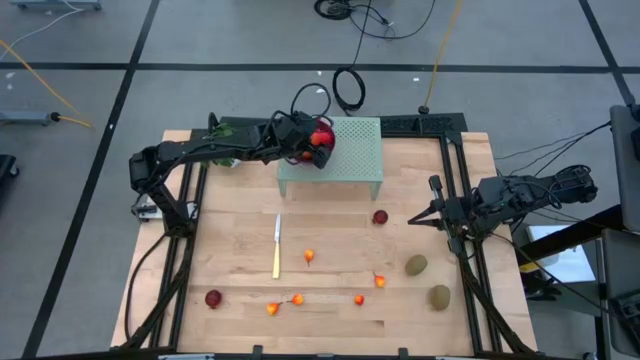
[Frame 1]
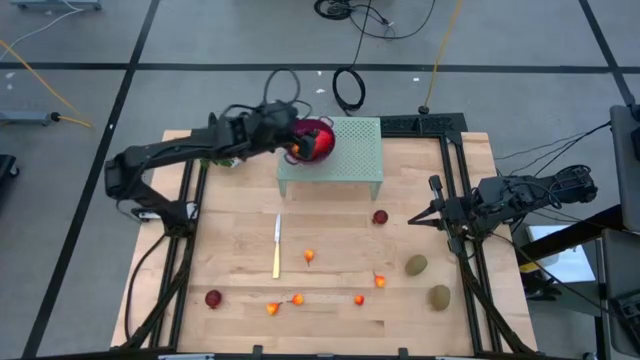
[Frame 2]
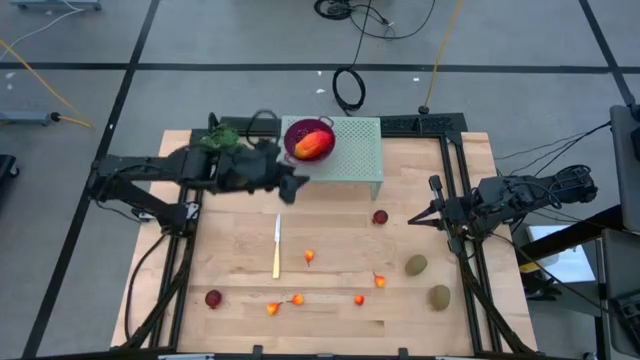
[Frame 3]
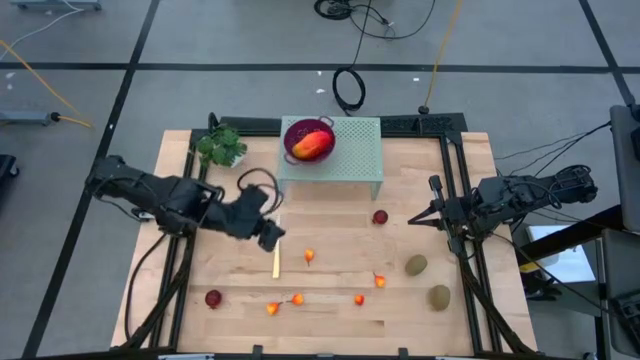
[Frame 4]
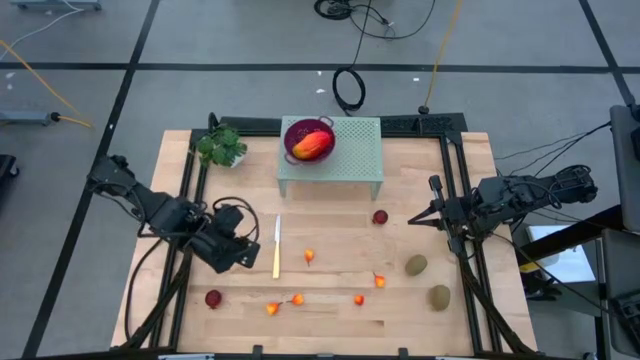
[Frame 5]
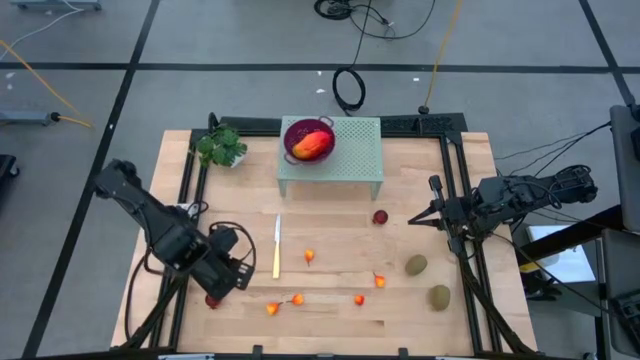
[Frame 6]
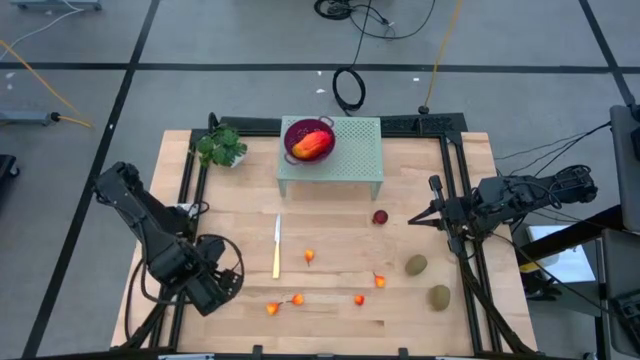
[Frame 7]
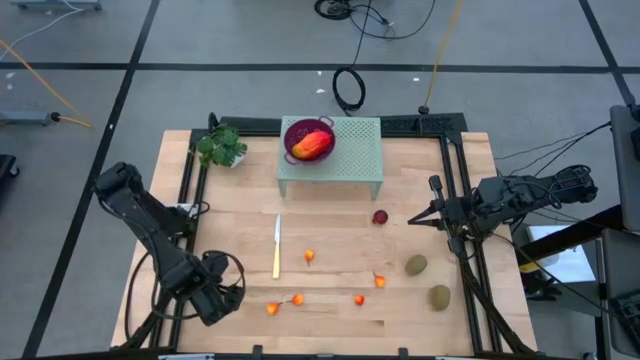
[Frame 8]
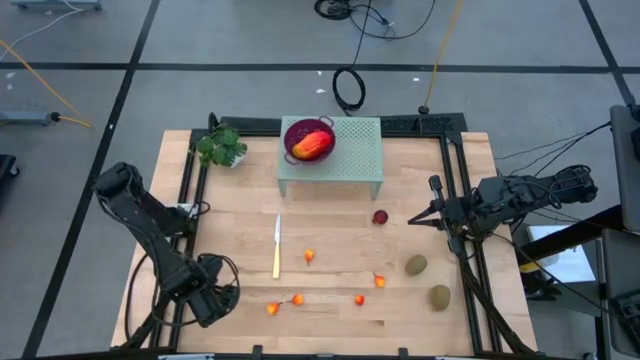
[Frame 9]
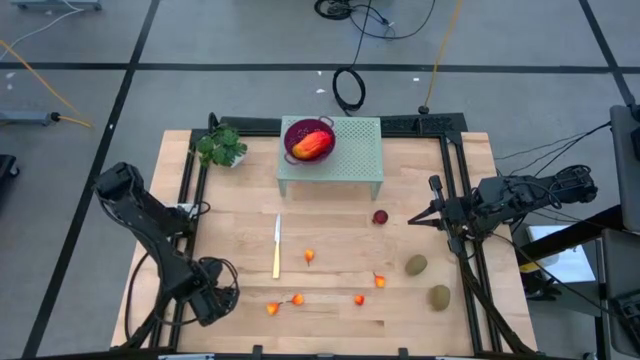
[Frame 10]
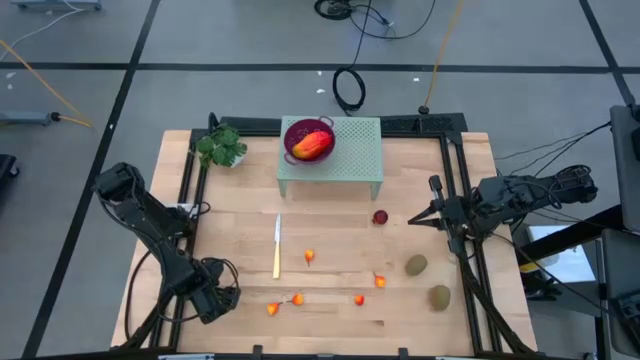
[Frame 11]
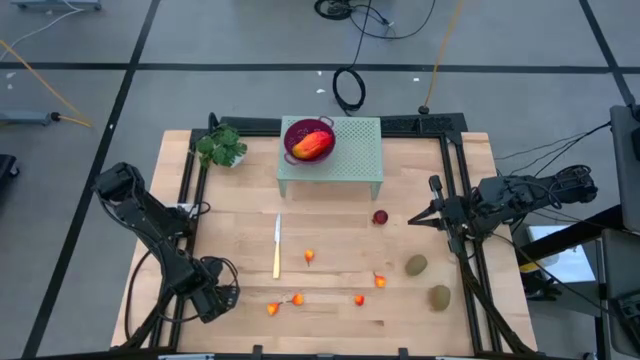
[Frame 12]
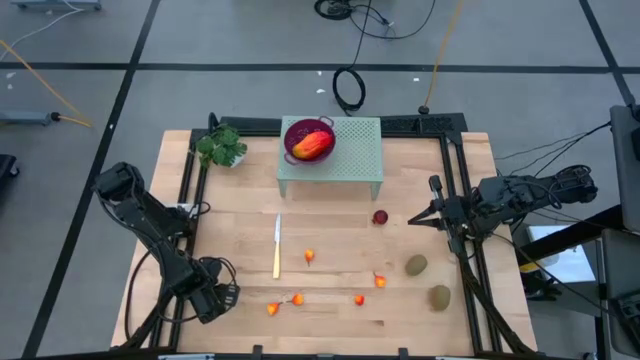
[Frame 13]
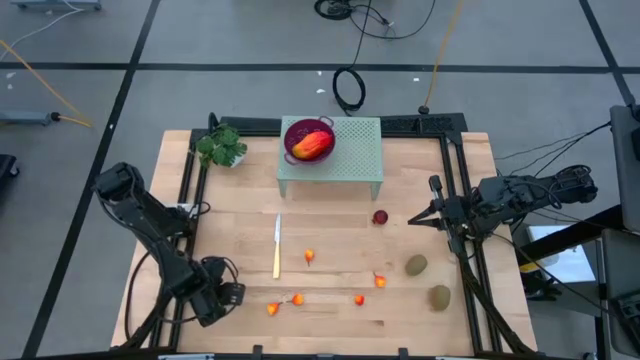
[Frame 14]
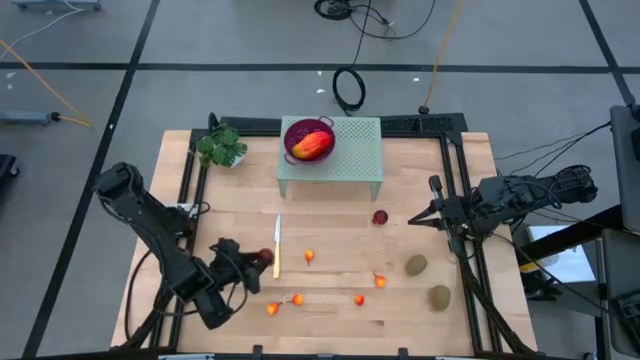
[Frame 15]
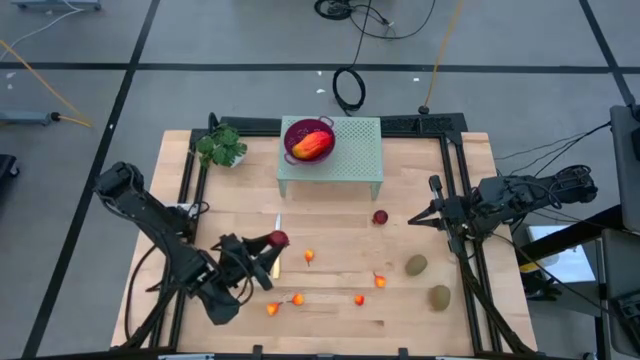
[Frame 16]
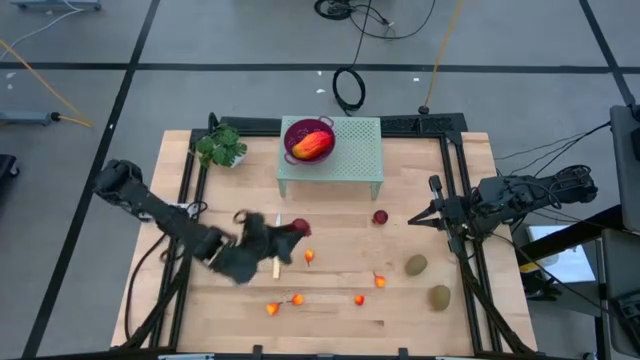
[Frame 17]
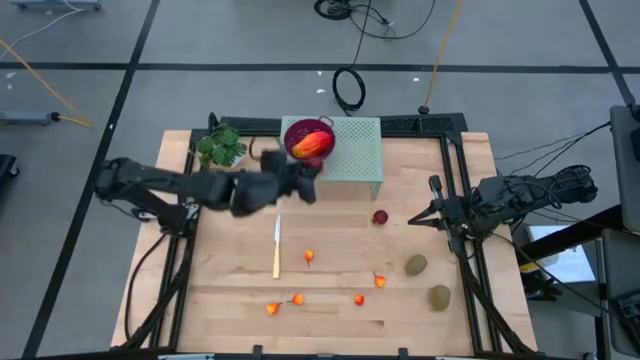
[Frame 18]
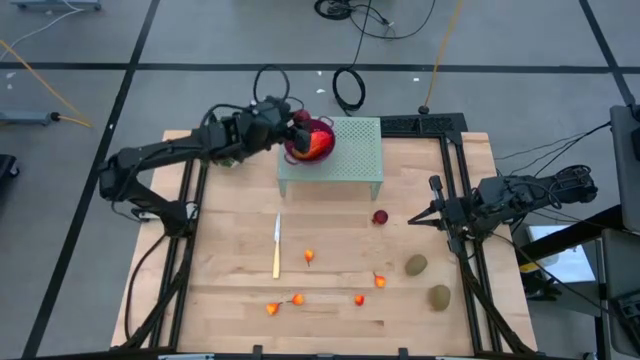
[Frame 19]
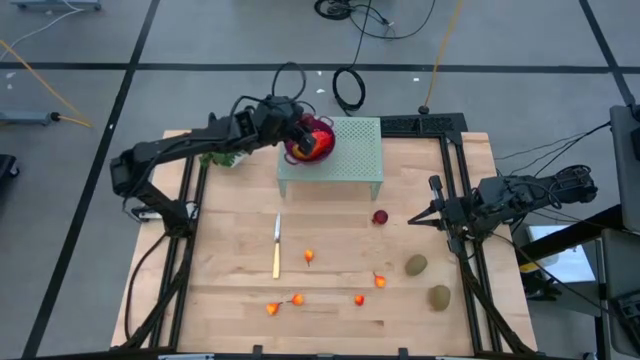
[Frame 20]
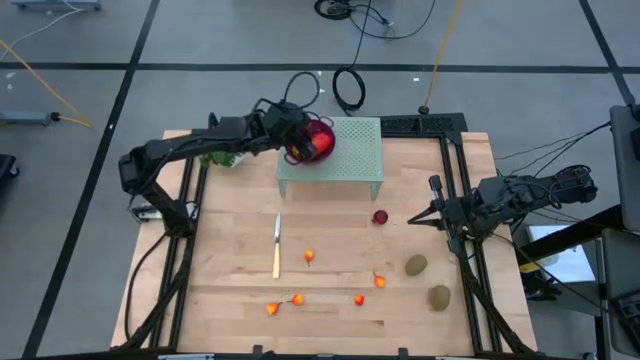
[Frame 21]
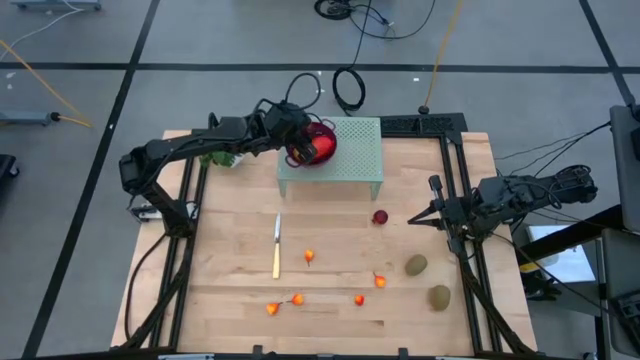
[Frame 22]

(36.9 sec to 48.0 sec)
Task: Pick & Place Fruit
Put the pomegranate into the strainer bowl on the shelf

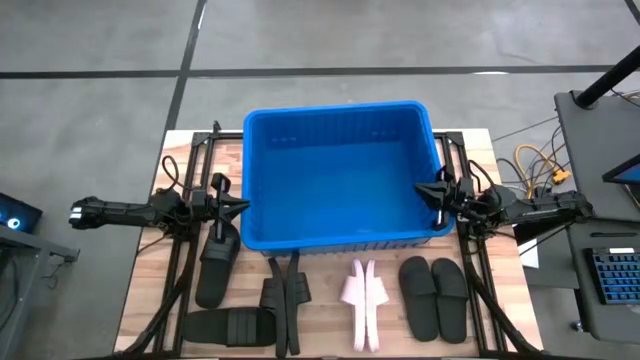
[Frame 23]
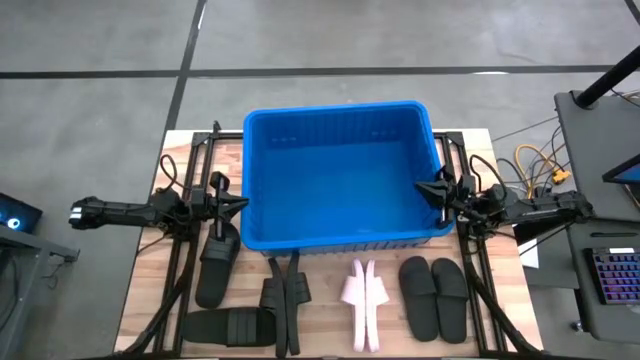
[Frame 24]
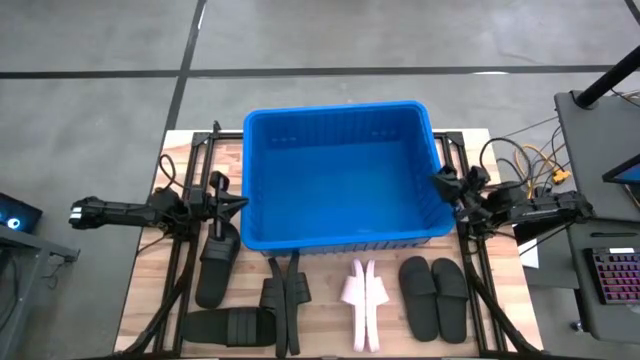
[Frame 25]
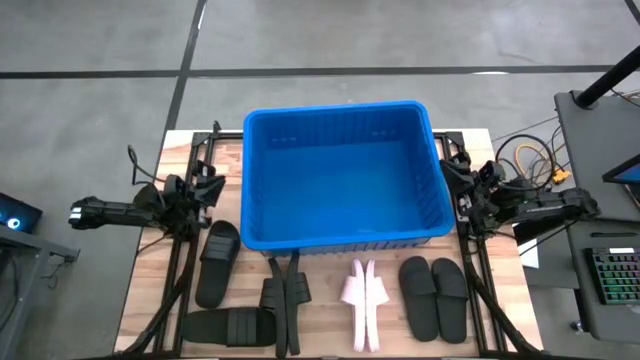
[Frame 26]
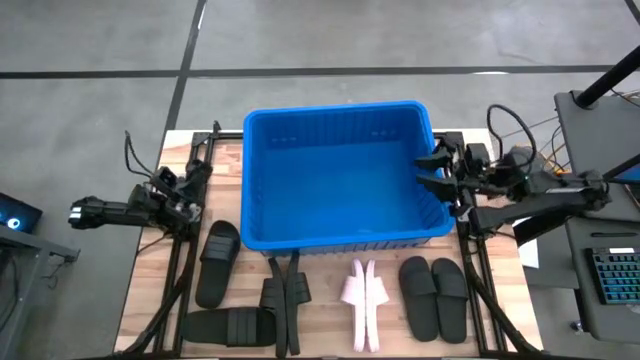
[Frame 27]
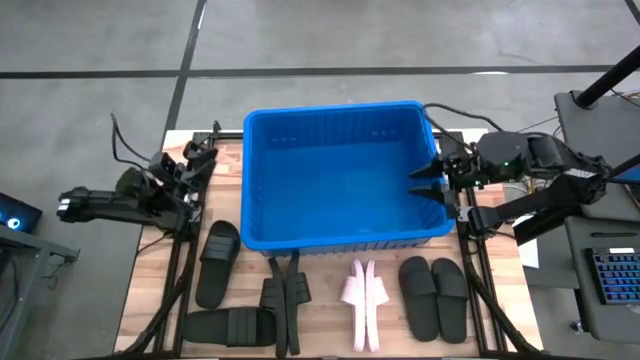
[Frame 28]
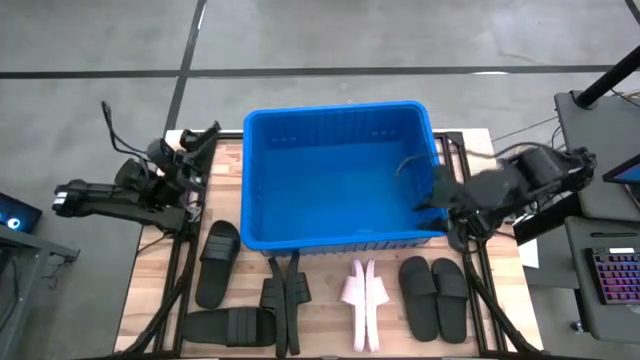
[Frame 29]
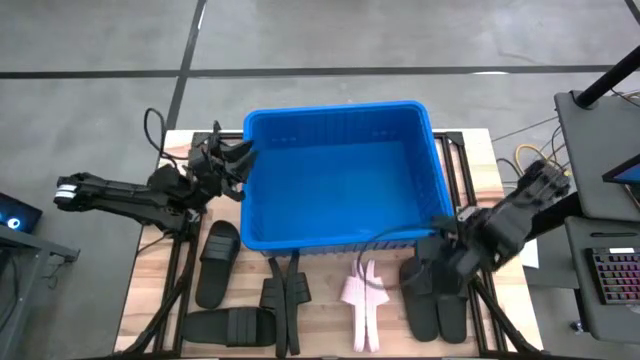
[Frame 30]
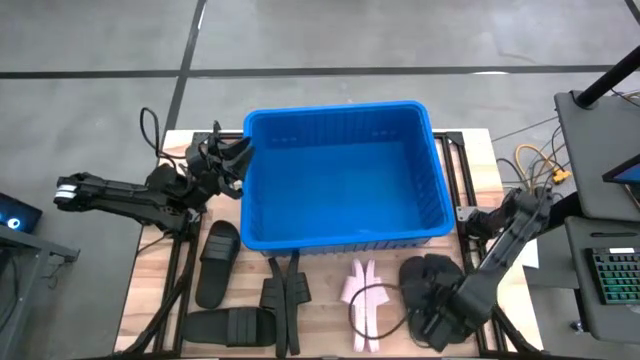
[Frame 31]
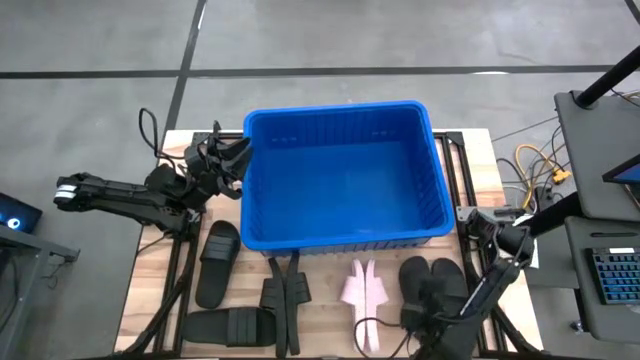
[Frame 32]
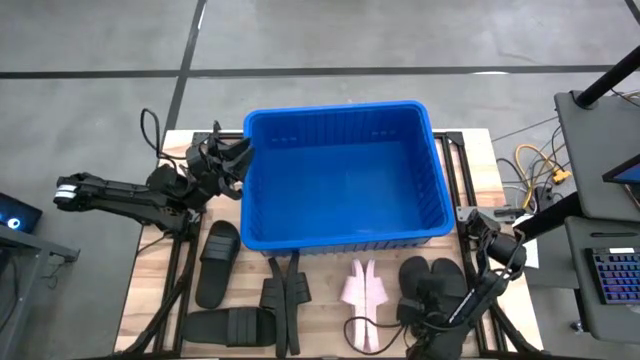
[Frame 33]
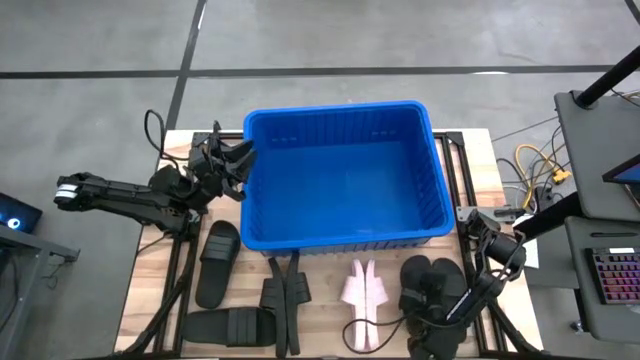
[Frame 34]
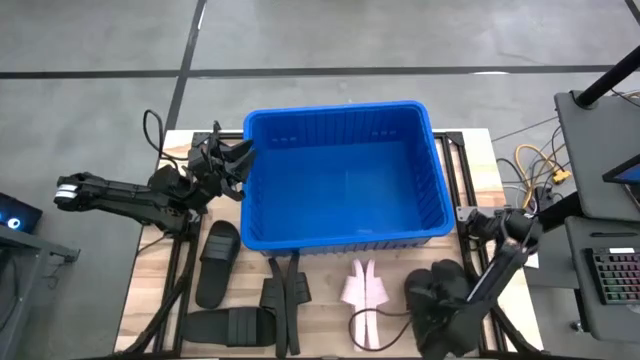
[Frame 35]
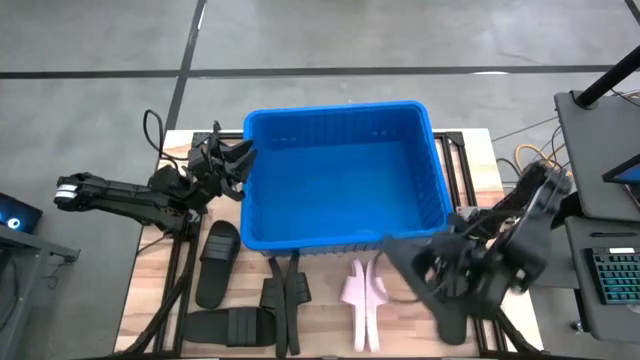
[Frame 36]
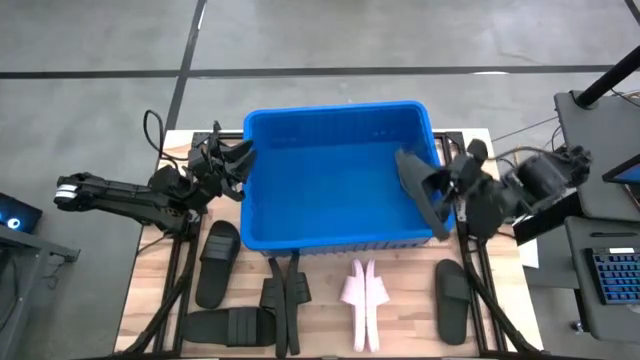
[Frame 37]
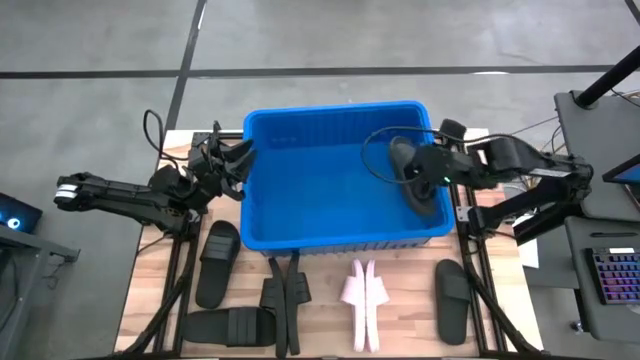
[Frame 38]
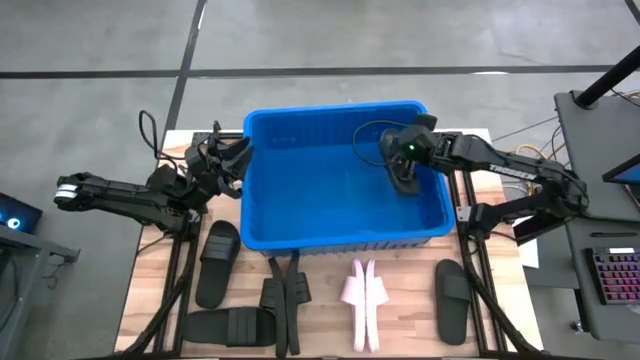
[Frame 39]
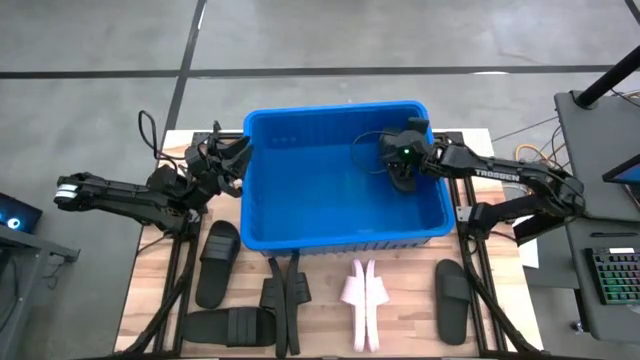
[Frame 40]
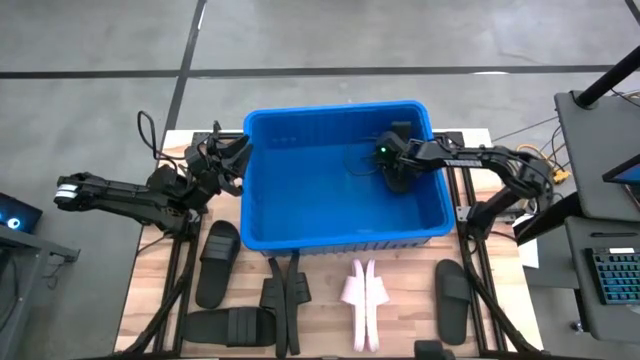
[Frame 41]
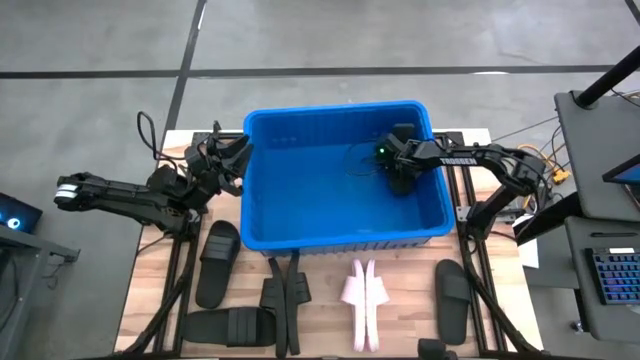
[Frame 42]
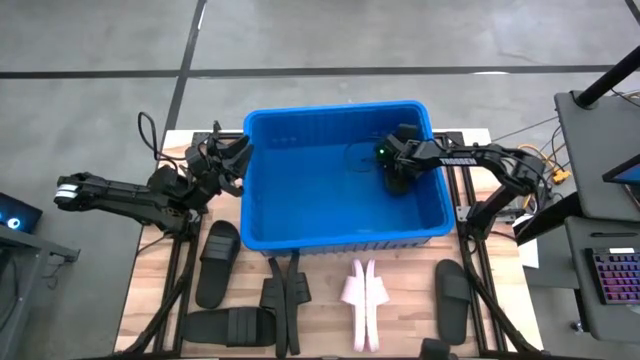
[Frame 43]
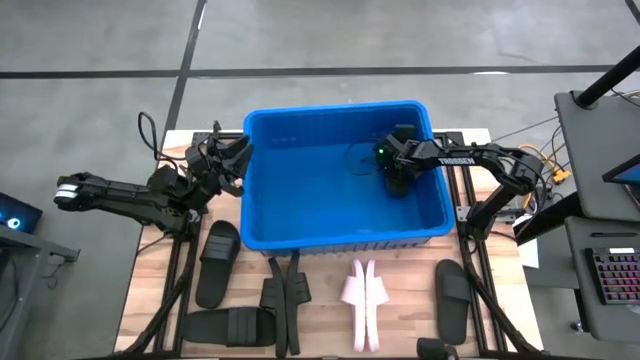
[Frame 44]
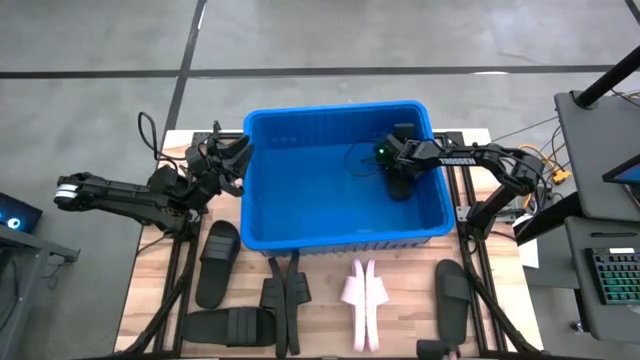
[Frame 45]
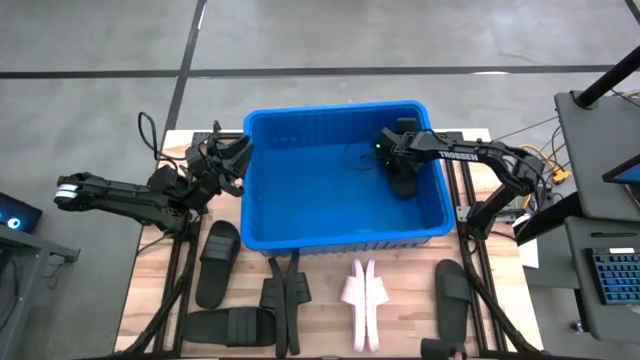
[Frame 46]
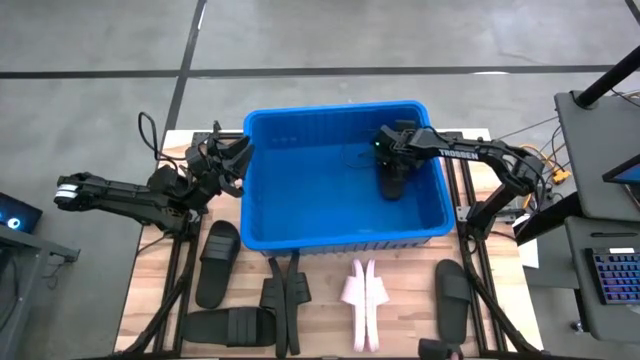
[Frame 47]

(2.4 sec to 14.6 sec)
Task: Pick and place slides into bin
Put the black slide into the blue bin
